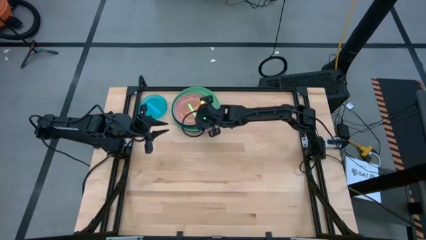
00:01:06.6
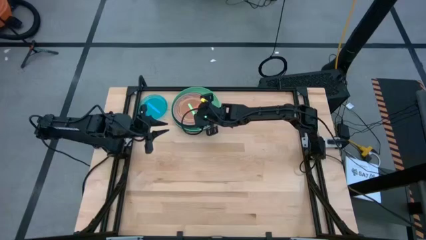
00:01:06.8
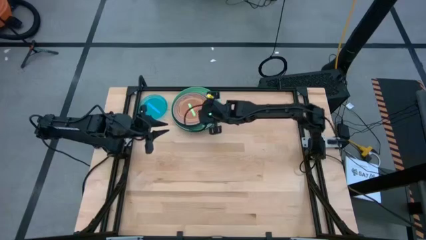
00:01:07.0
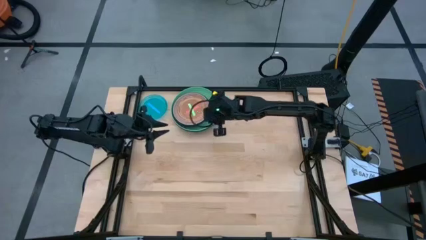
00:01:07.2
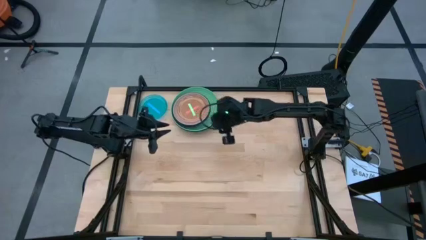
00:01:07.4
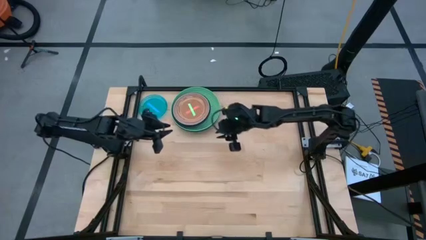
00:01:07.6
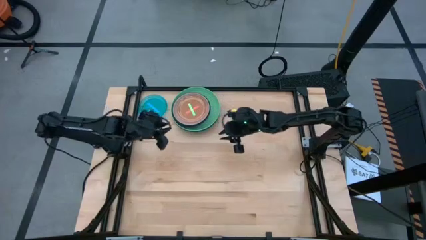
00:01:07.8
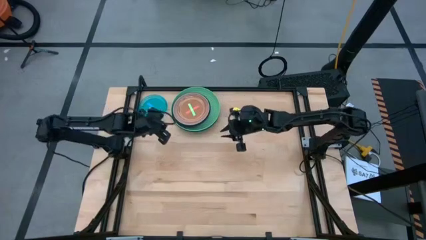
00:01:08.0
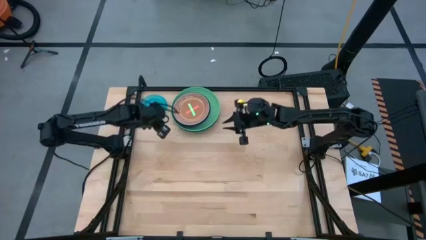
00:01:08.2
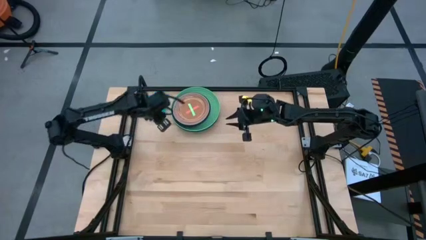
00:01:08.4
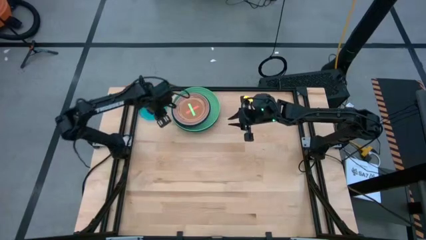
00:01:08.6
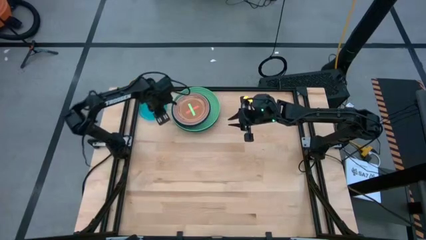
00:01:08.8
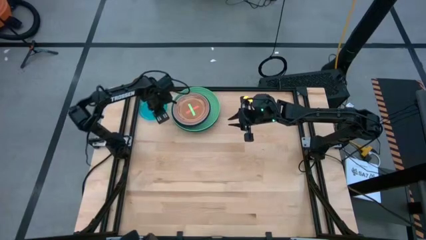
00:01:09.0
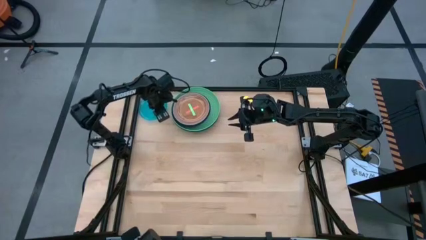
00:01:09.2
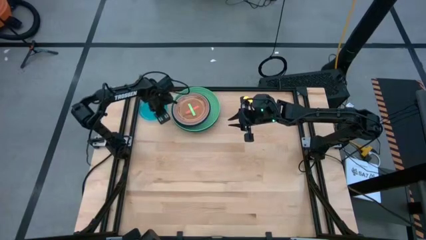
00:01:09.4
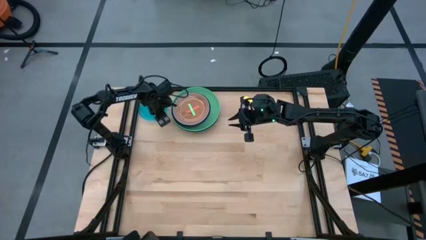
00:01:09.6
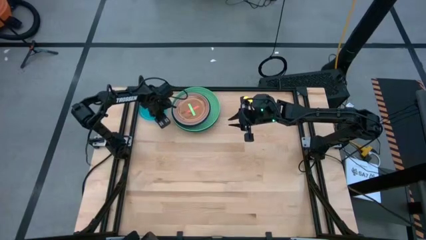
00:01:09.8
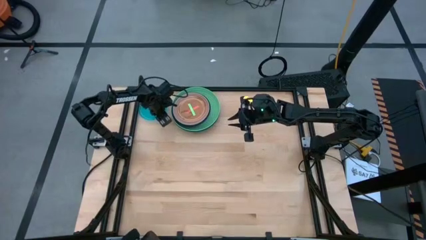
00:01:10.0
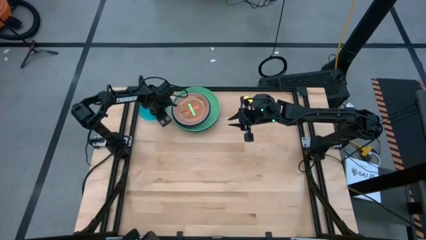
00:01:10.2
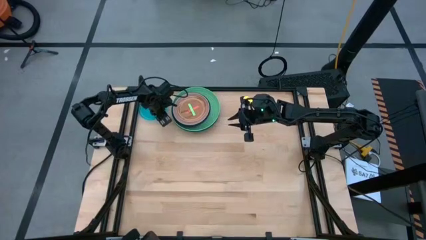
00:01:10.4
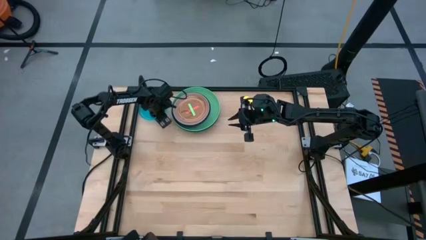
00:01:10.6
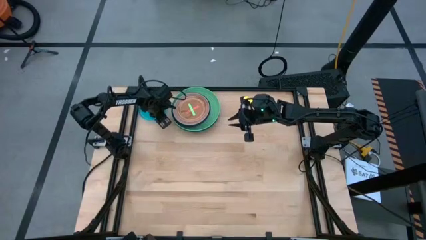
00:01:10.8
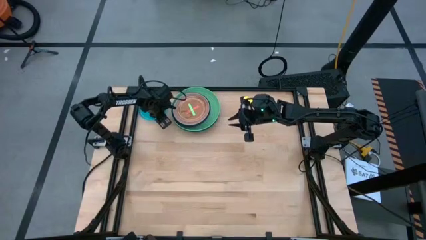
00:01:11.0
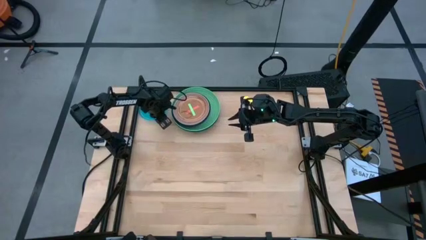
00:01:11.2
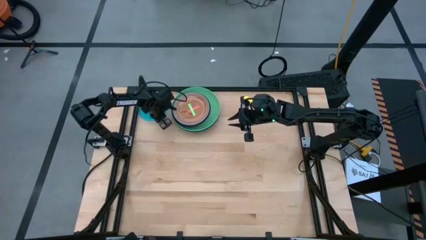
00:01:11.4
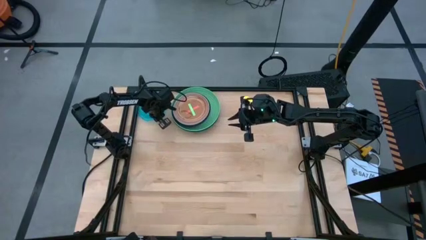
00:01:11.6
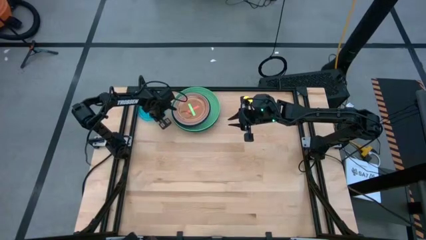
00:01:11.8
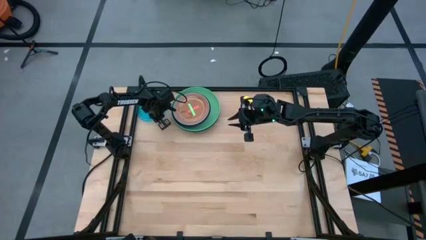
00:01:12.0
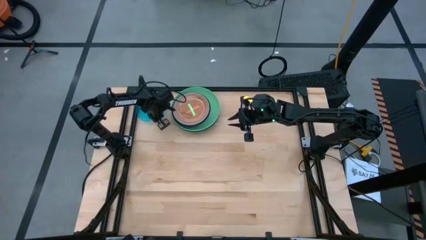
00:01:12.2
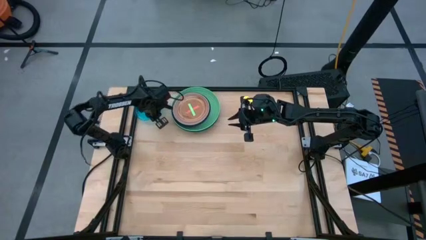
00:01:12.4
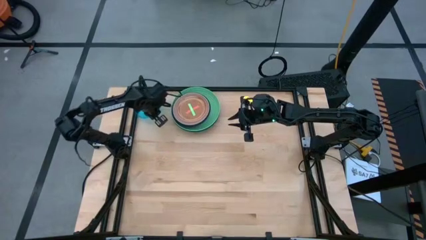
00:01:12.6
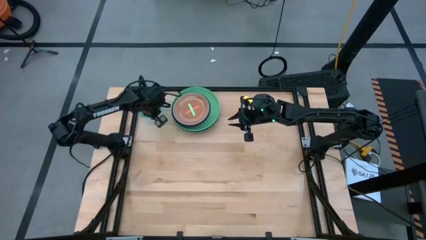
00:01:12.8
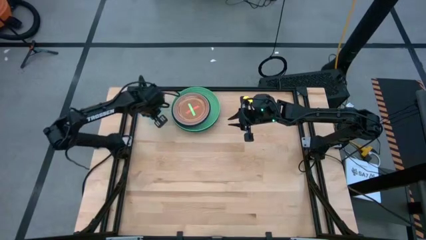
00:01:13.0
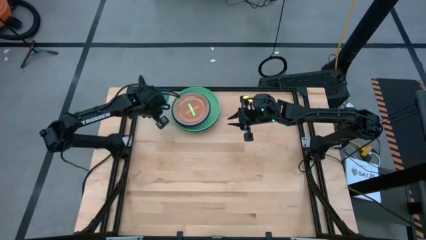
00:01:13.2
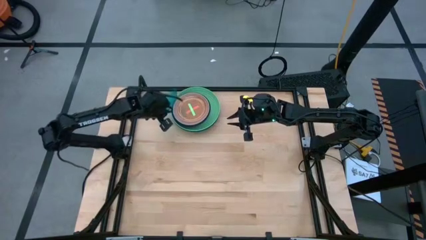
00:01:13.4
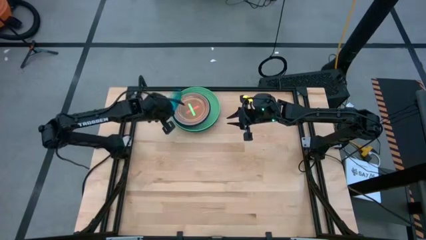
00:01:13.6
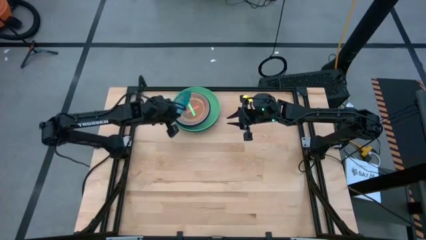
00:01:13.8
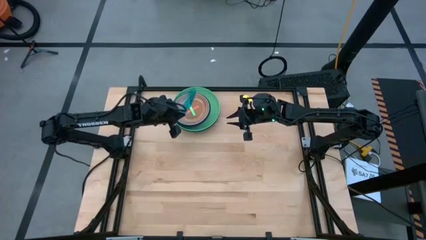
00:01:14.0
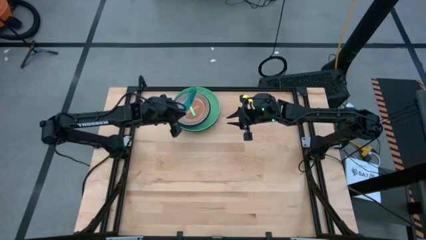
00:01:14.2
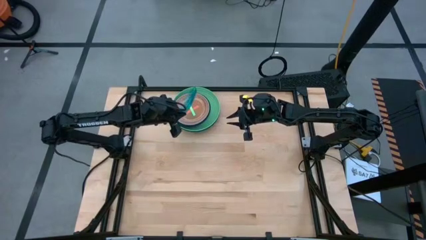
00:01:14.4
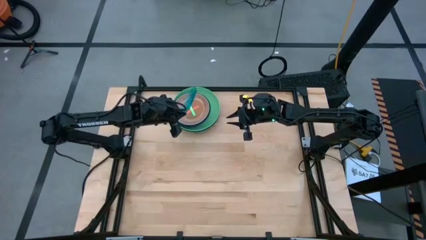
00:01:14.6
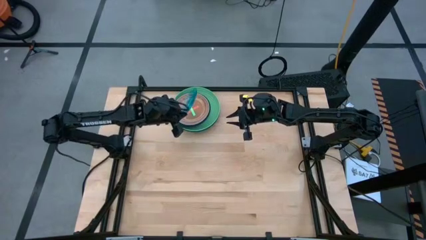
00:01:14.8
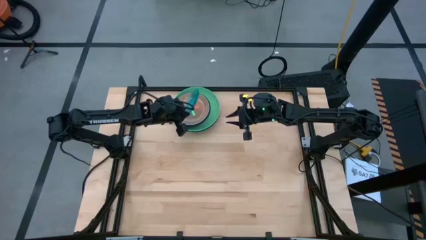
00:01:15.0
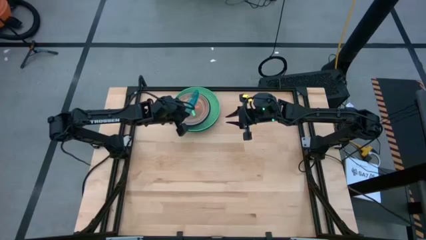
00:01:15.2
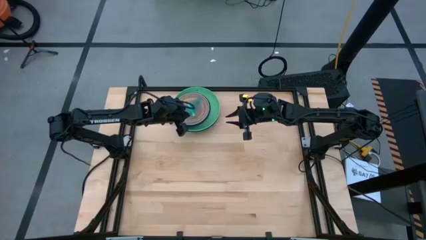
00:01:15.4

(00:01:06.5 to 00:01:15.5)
Task: Stack plastic plates
Stack the transparent blue plate on the transparent green plate

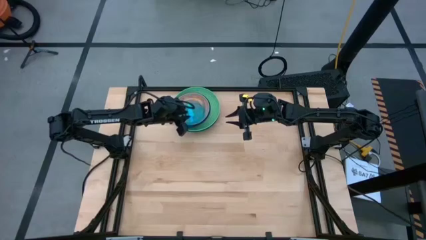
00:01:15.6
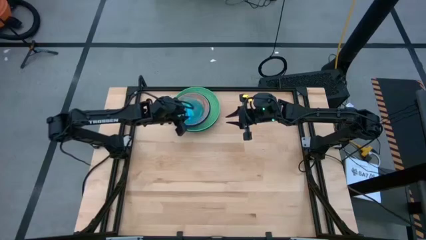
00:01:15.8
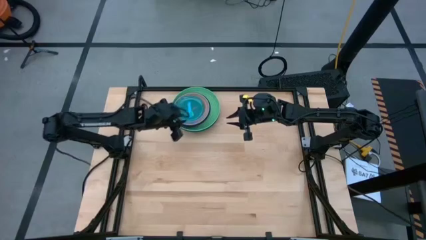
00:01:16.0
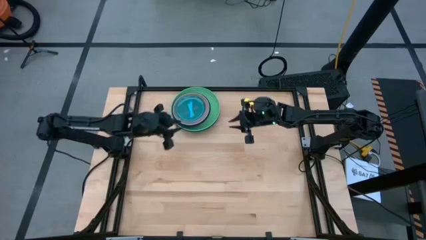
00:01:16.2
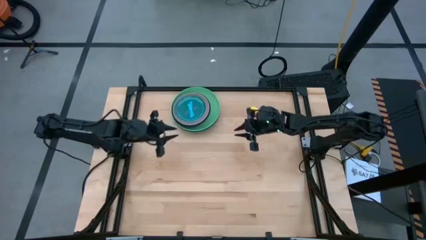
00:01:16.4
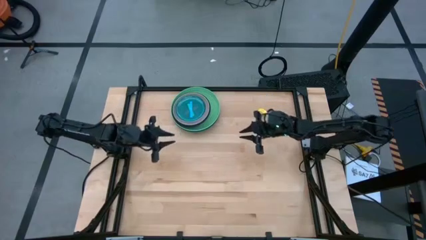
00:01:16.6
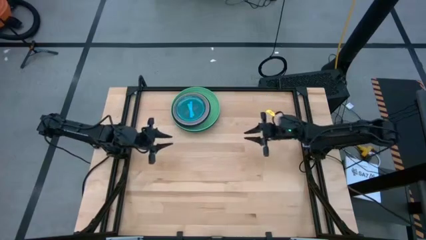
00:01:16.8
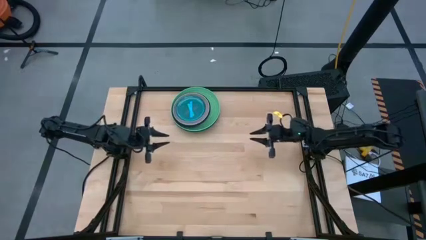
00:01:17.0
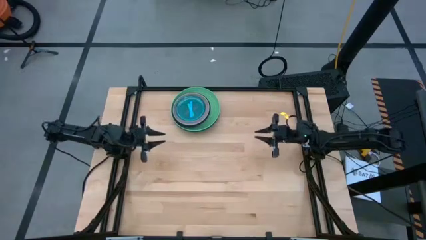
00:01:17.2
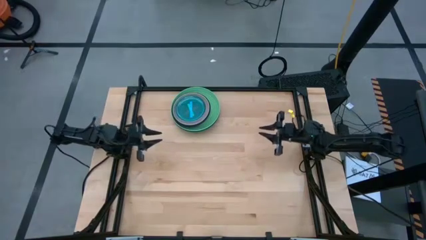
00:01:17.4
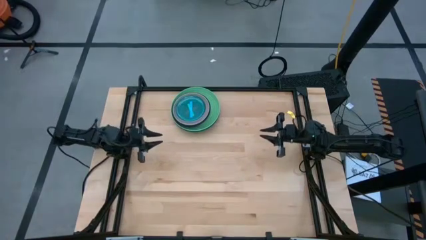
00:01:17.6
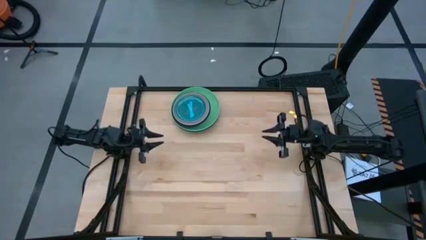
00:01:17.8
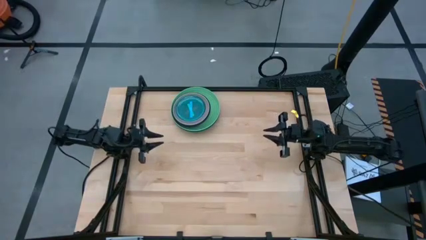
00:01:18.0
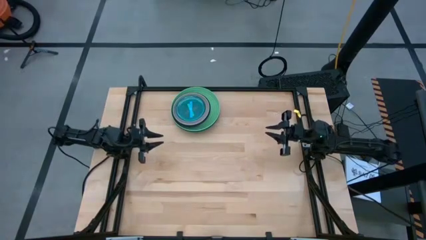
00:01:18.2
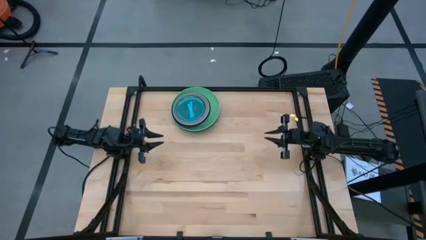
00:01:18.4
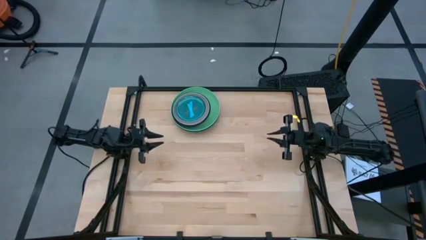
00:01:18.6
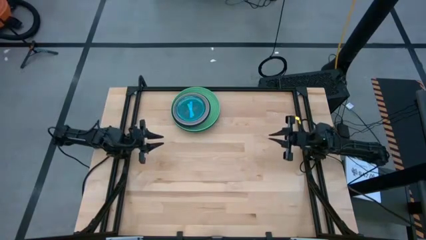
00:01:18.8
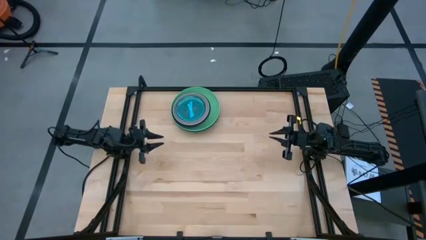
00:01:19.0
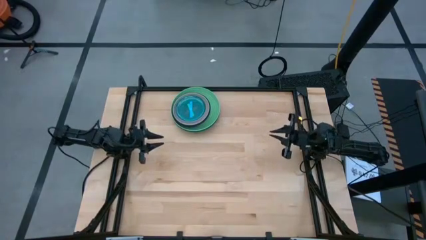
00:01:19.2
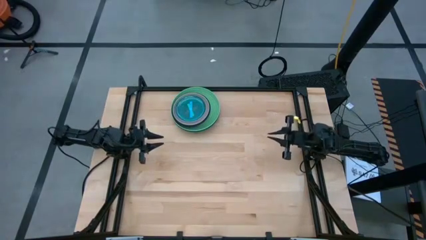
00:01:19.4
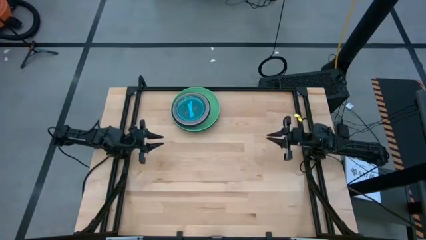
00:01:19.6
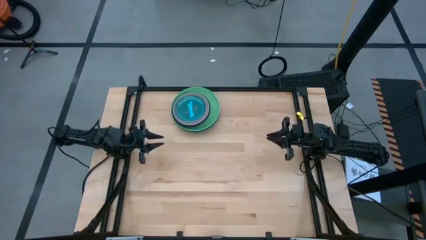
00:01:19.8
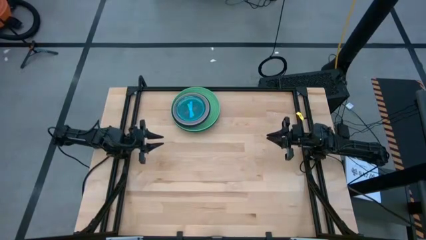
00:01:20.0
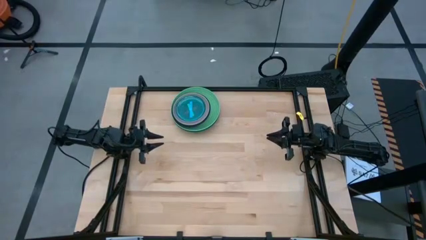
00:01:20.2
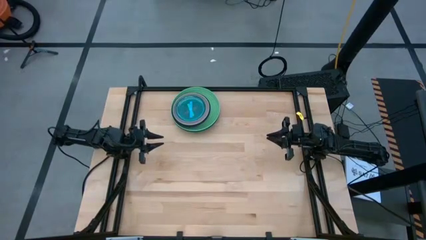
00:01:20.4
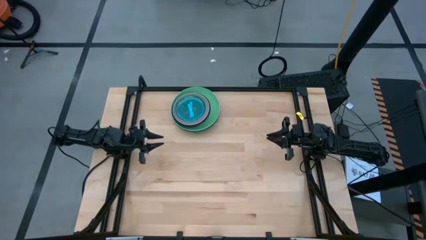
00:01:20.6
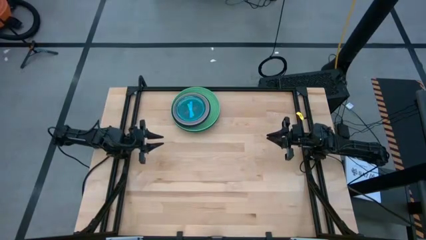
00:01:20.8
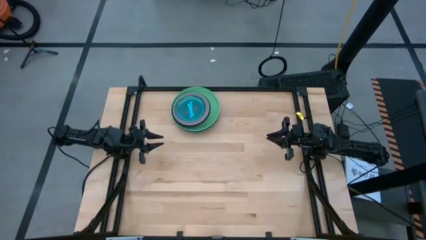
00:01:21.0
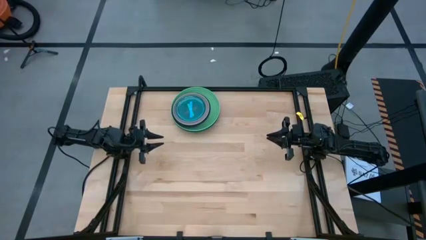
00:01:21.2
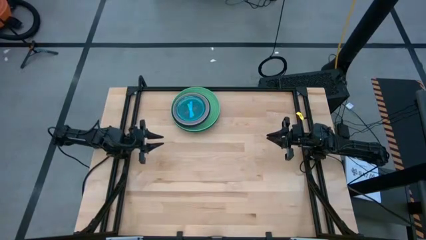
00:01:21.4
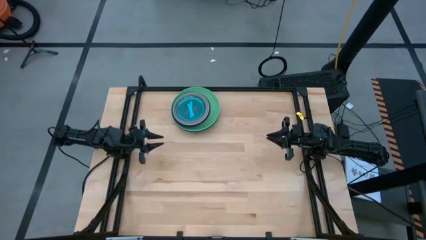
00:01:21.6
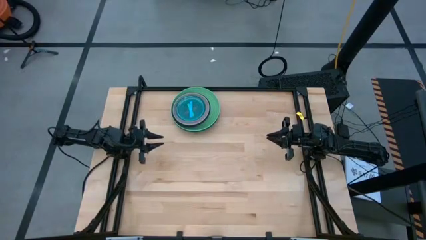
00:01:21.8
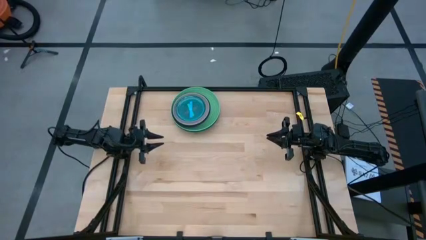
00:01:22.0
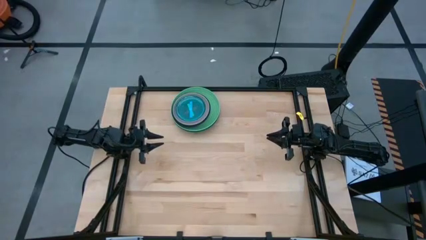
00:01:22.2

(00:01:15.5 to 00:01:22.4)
Return to Home Position
